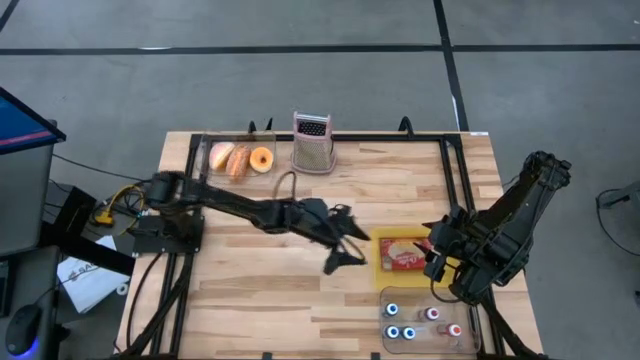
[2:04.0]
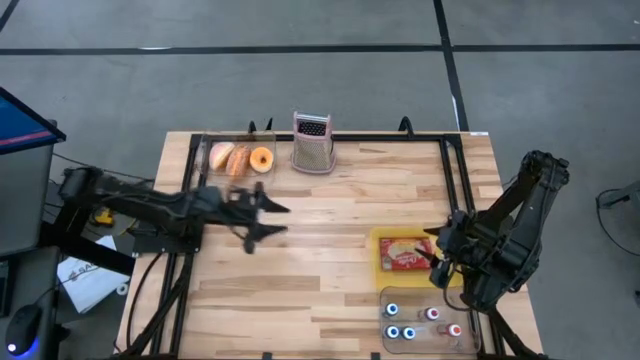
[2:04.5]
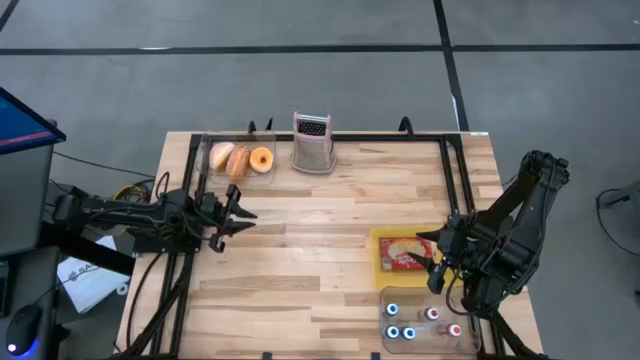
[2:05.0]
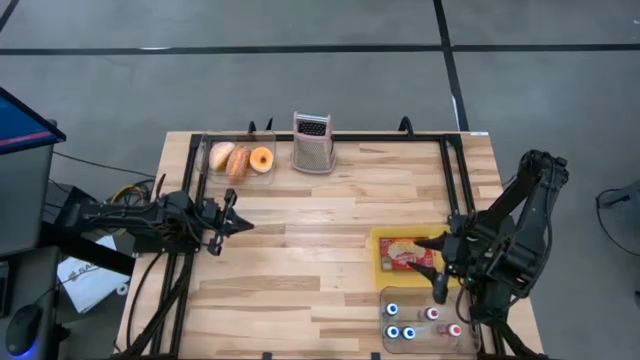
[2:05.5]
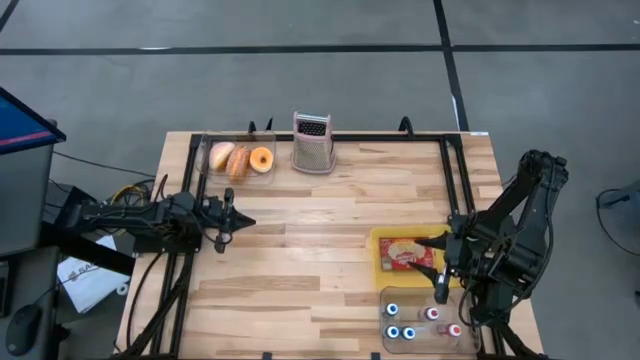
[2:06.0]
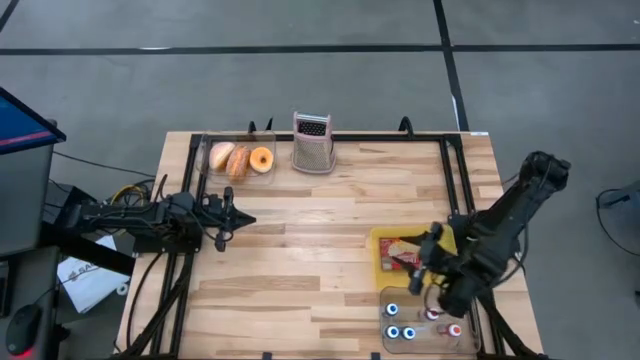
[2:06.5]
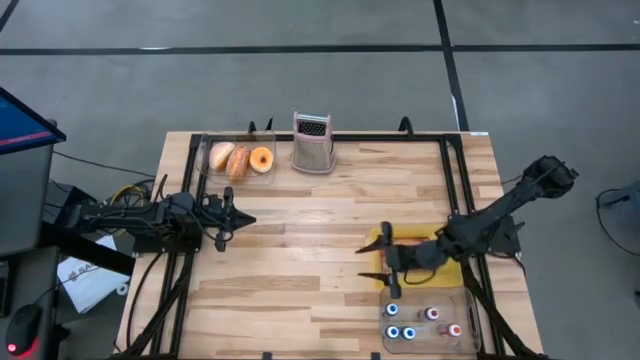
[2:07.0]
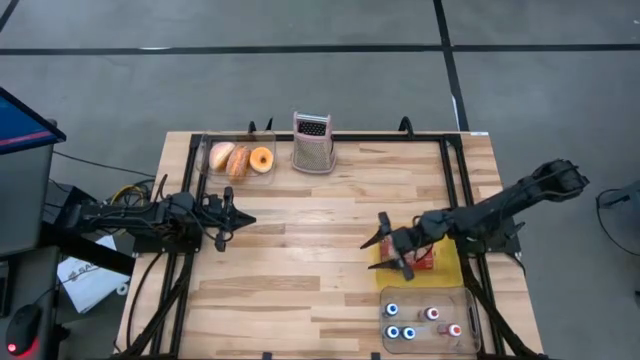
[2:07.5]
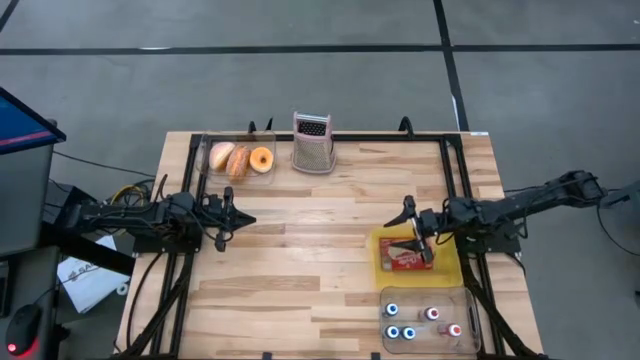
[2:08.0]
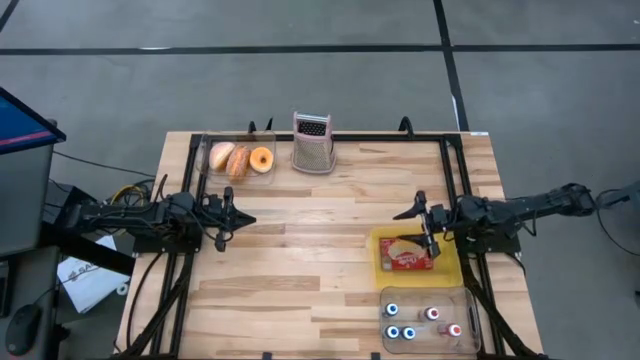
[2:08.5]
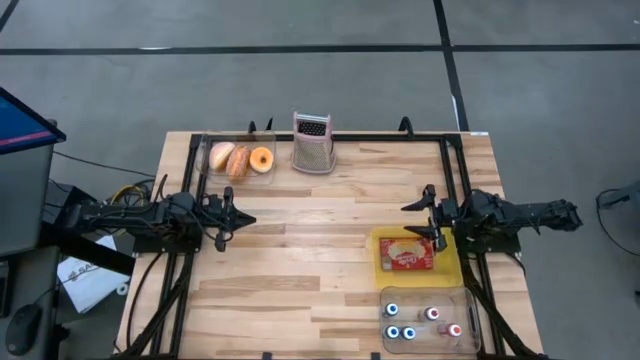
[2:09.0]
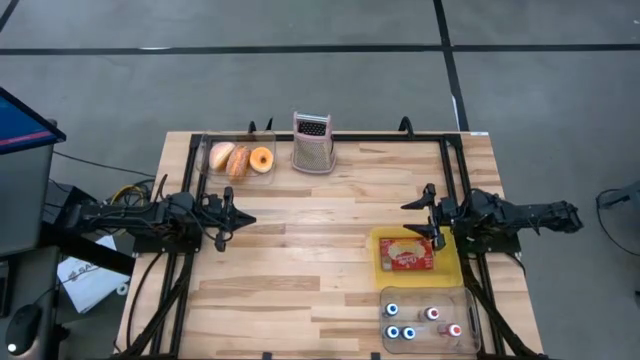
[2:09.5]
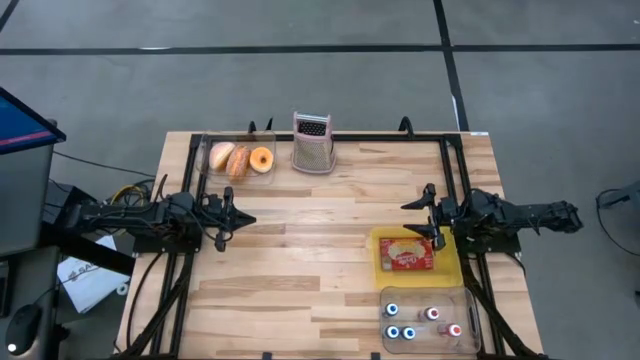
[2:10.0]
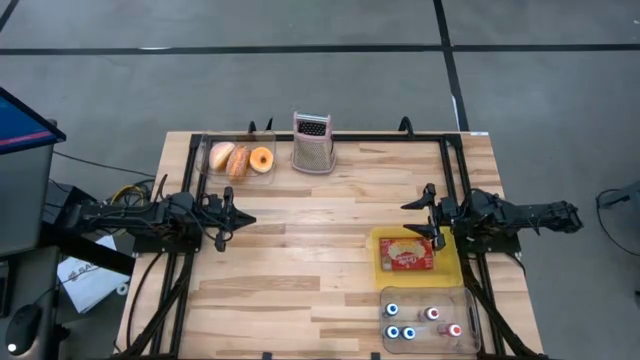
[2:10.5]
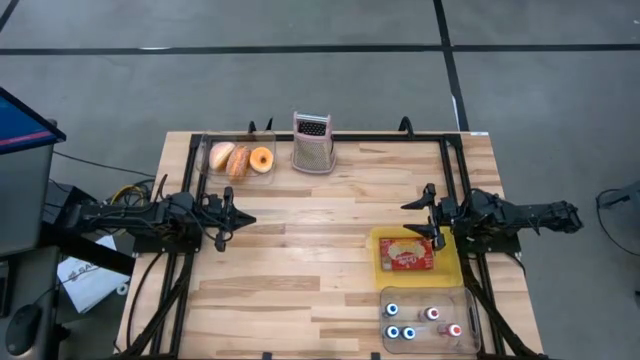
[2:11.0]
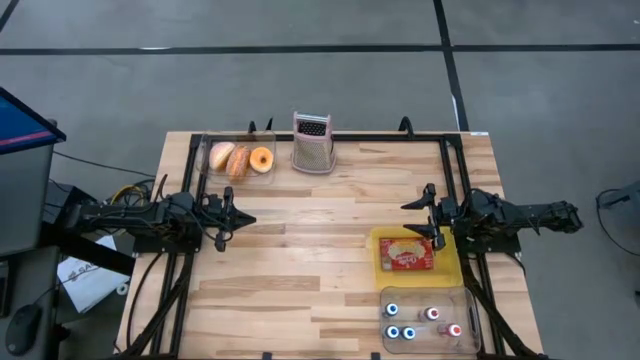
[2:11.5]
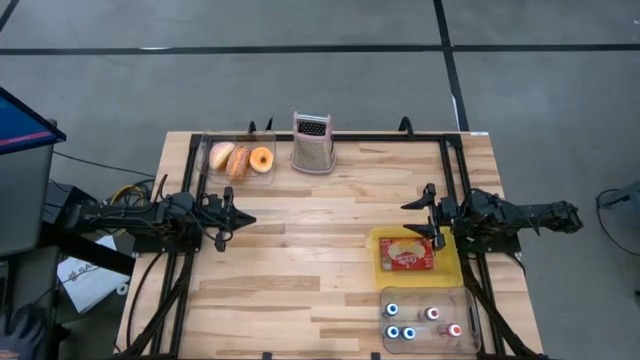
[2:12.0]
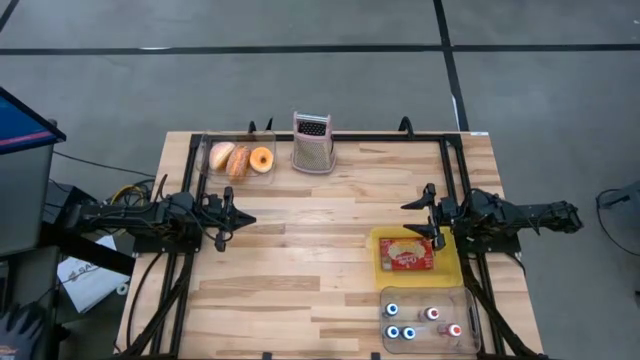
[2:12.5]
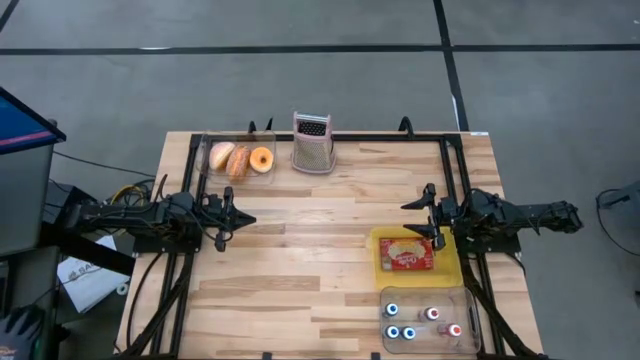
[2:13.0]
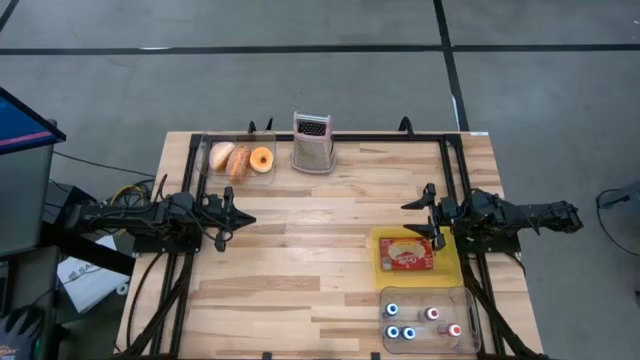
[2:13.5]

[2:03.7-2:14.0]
Task: Pick & Place Food Item
Return to home position

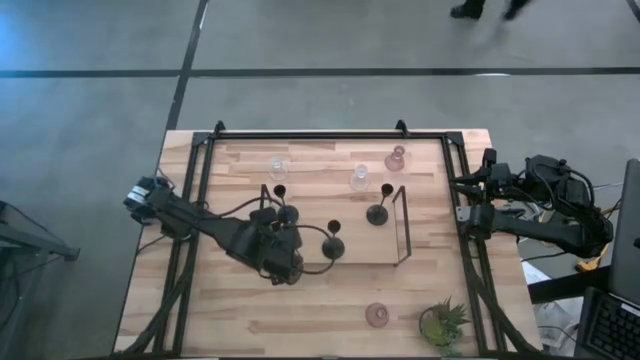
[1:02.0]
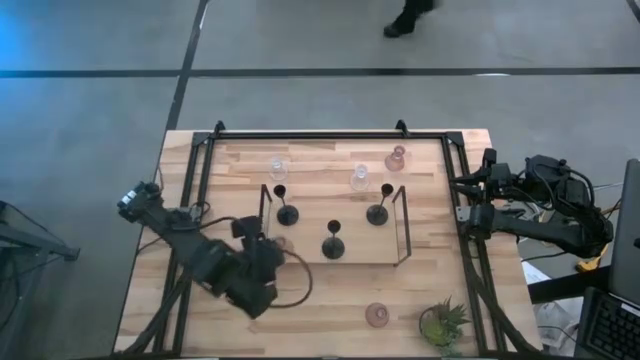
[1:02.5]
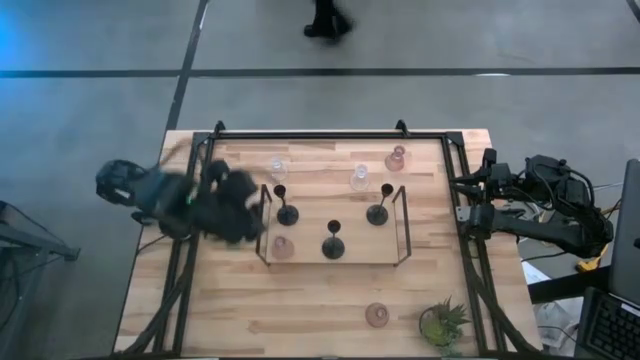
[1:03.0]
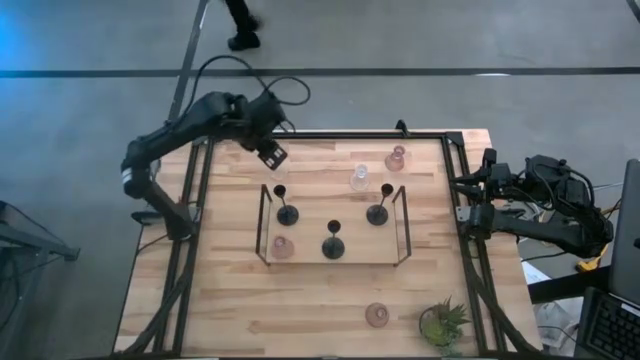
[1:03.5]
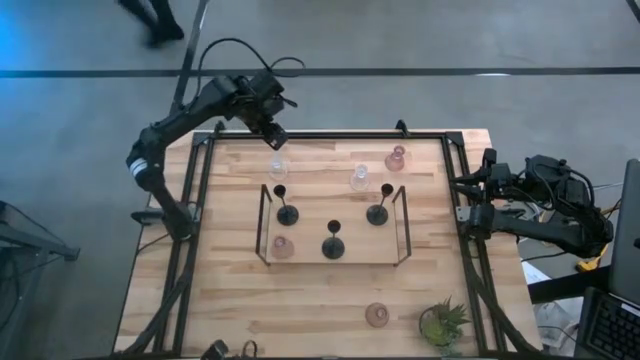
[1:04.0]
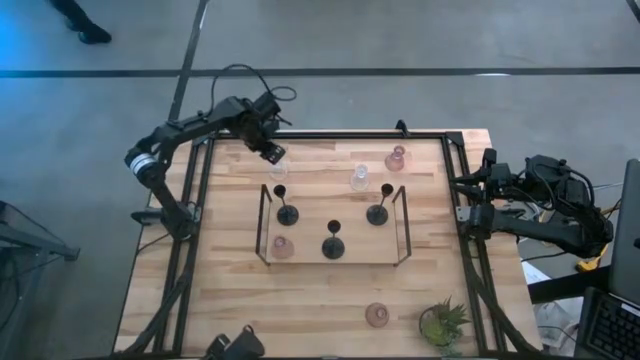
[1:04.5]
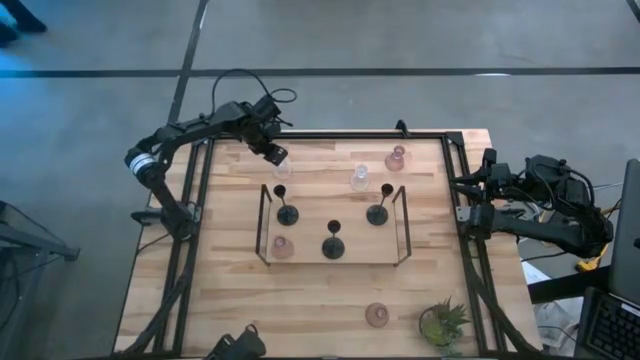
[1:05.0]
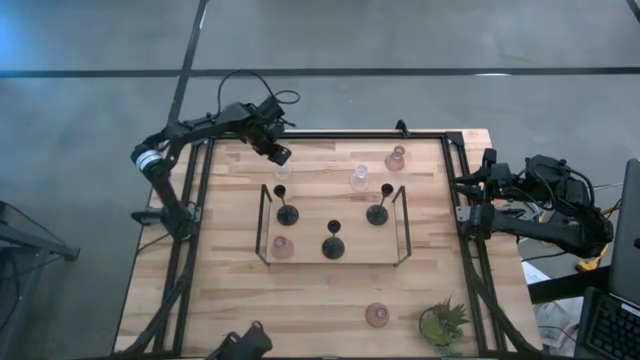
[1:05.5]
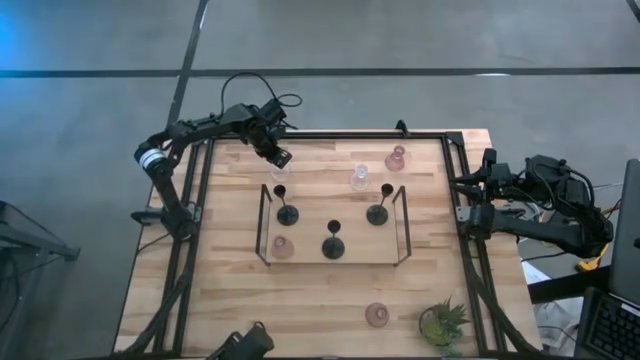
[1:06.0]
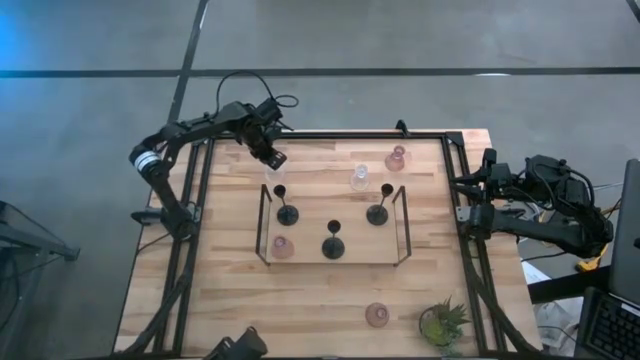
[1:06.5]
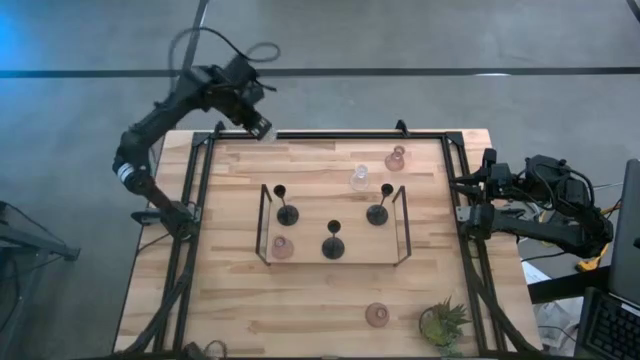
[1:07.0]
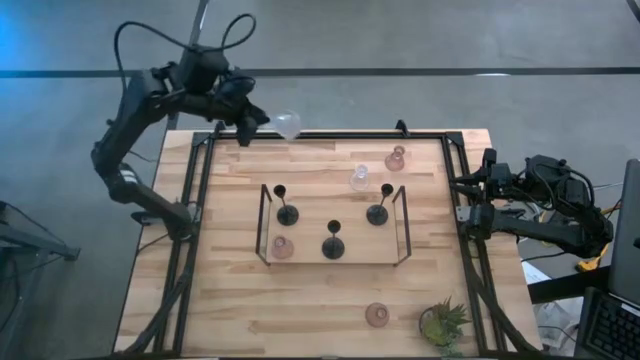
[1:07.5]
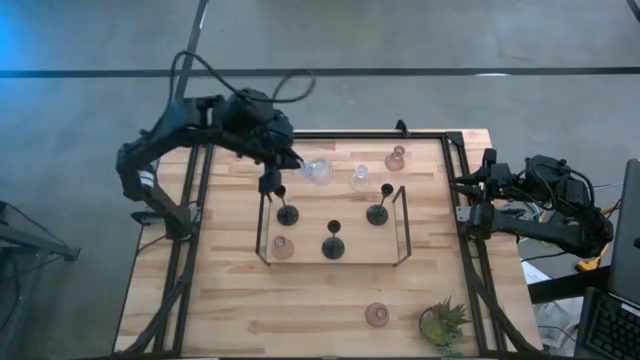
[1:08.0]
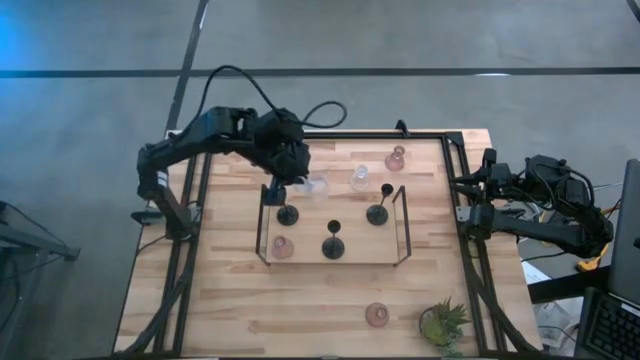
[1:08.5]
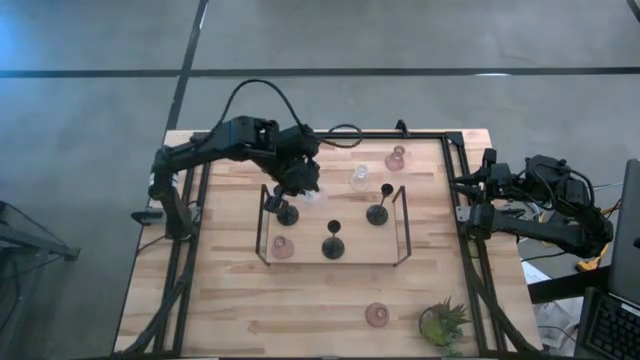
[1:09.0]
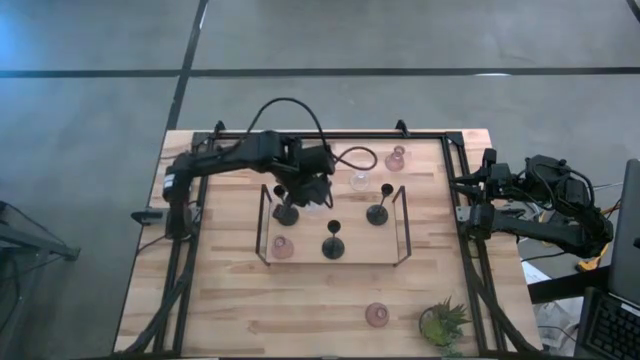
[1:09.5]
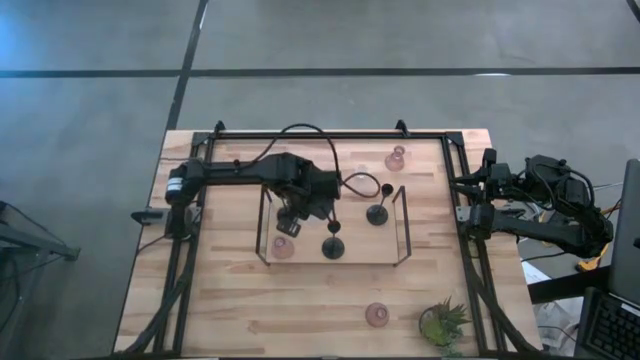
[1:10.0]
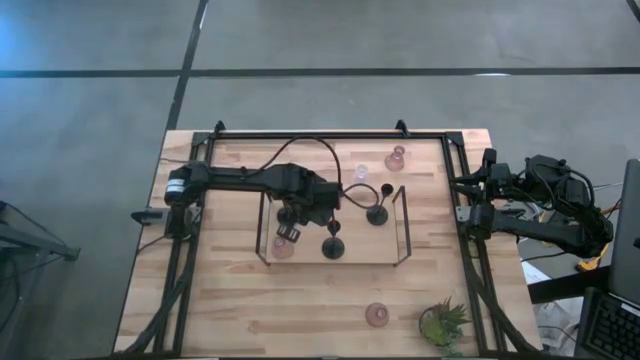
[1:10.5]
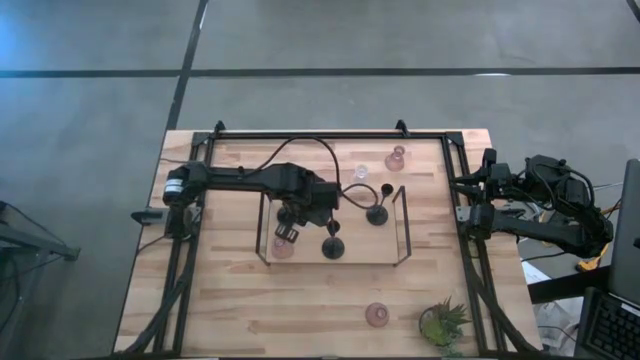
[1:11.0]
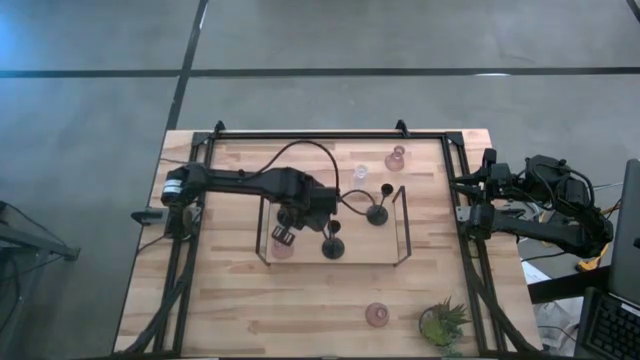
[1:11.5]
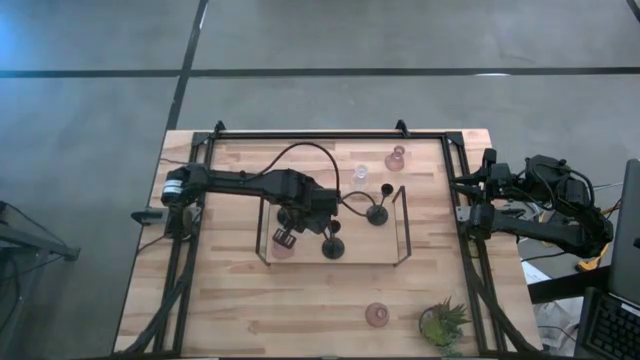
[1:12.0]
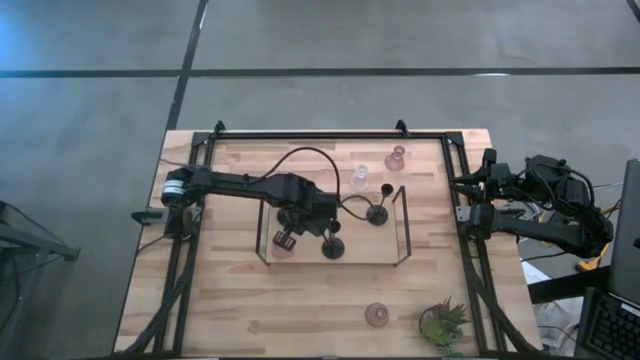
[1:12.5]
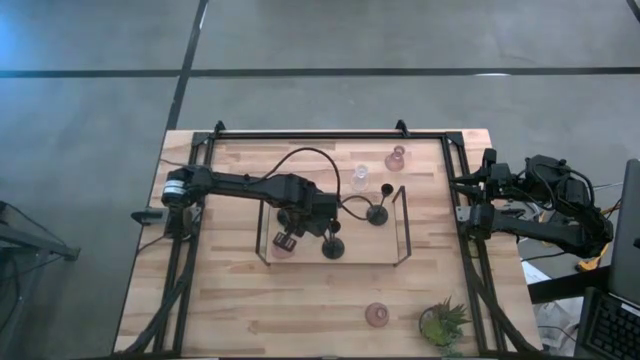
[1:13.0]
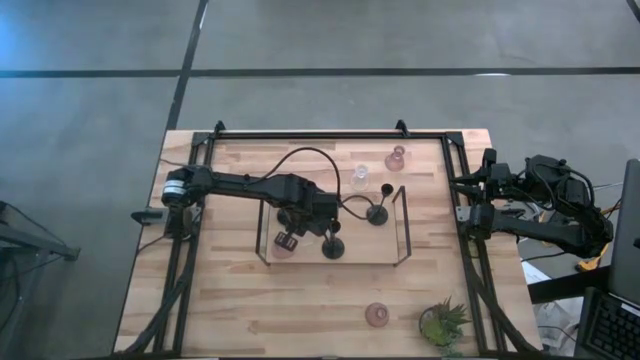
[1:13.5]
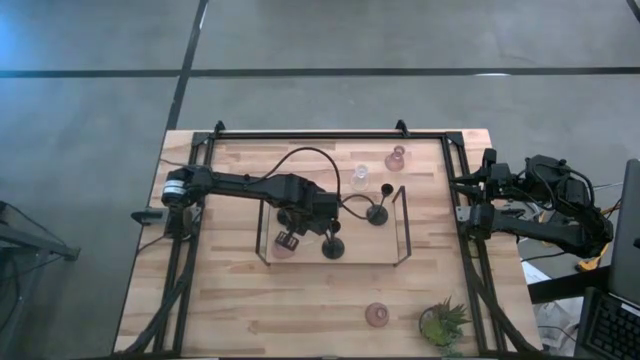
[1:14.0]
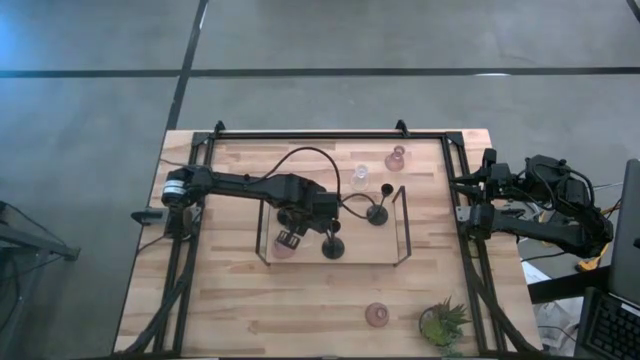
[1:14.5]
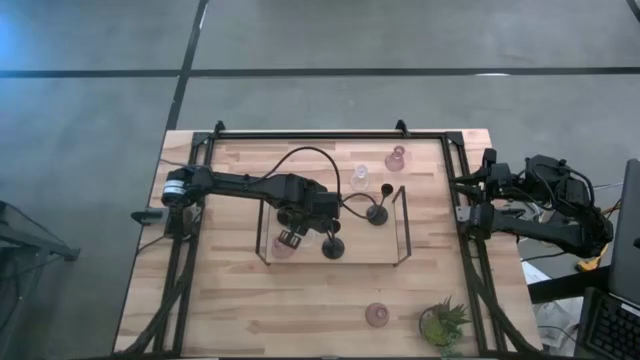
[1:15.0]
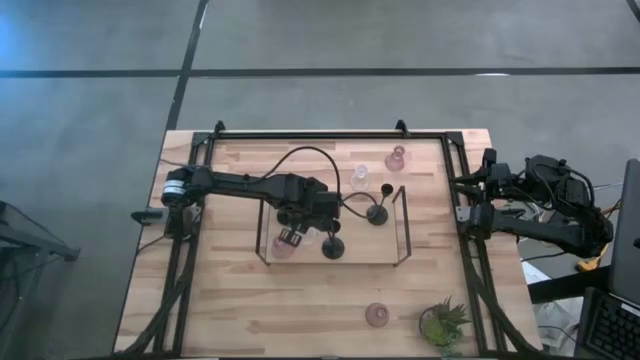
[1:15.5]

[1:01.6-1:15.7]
Task: Pick & Place candle stick holders
Put the left transparent glass candle holder on the shelf
